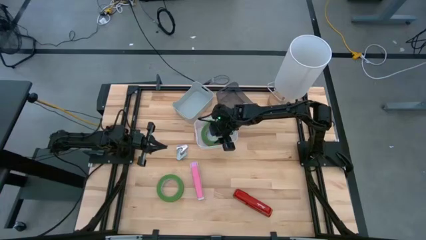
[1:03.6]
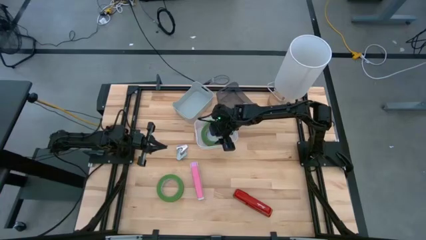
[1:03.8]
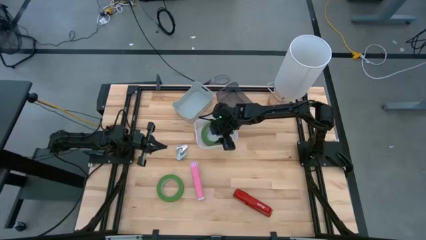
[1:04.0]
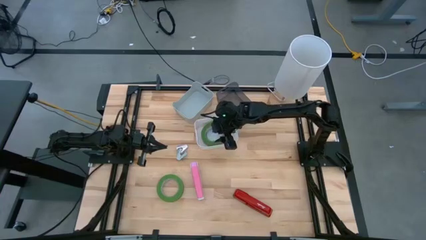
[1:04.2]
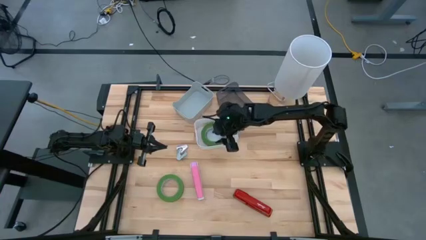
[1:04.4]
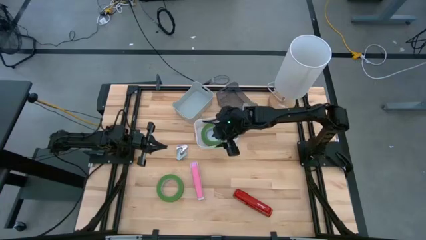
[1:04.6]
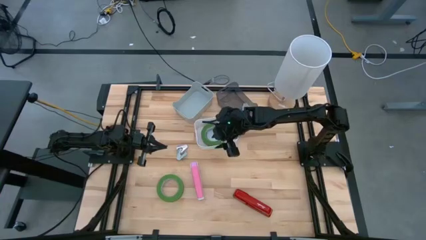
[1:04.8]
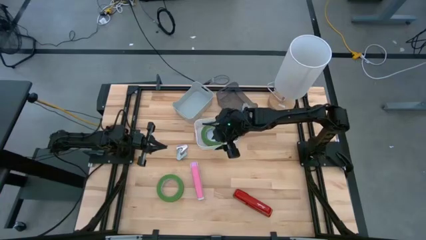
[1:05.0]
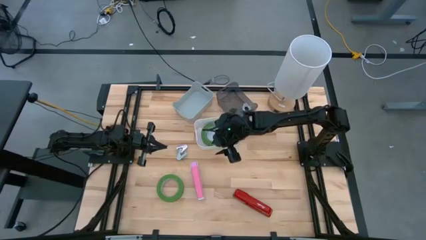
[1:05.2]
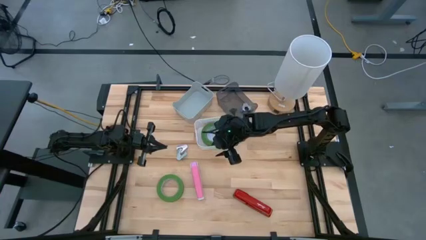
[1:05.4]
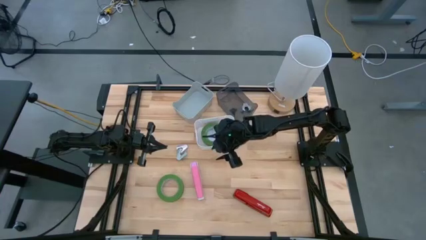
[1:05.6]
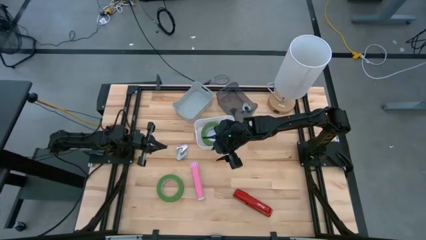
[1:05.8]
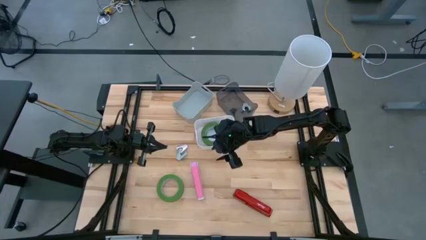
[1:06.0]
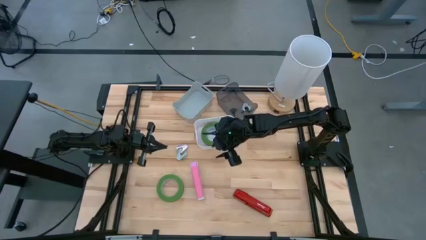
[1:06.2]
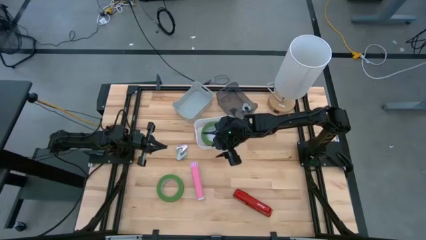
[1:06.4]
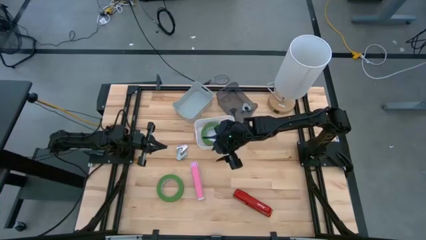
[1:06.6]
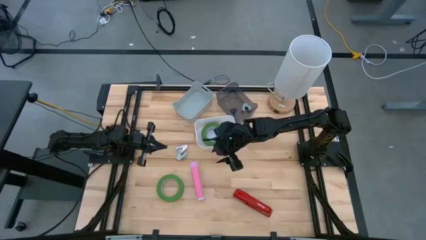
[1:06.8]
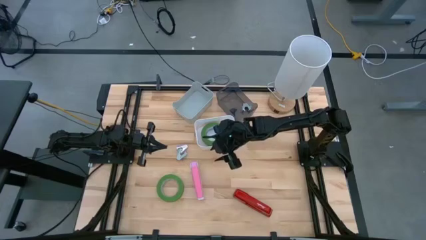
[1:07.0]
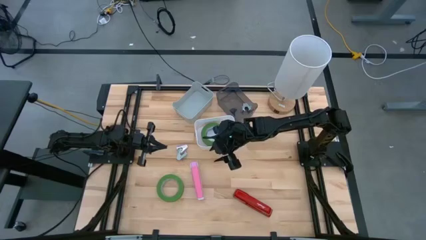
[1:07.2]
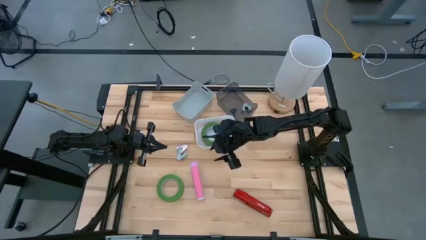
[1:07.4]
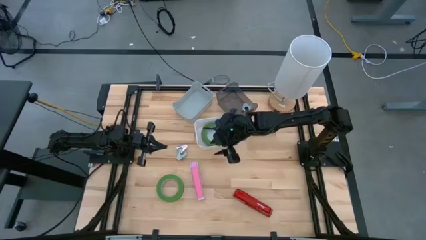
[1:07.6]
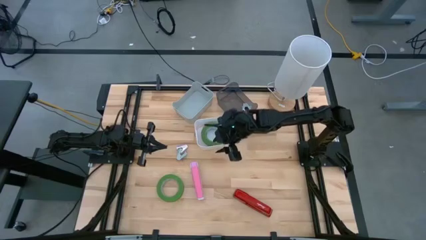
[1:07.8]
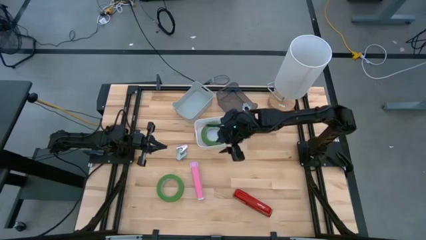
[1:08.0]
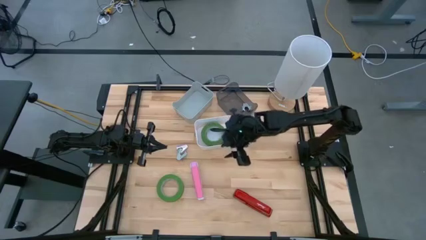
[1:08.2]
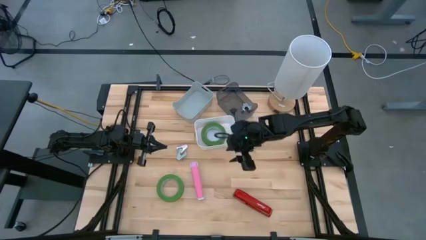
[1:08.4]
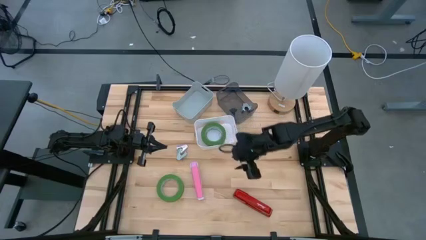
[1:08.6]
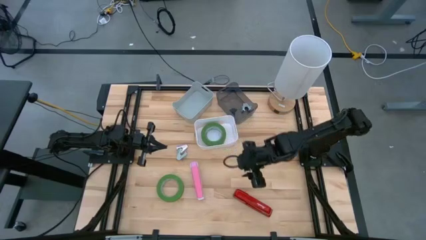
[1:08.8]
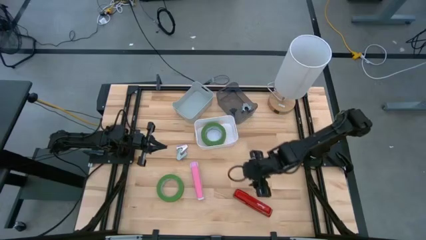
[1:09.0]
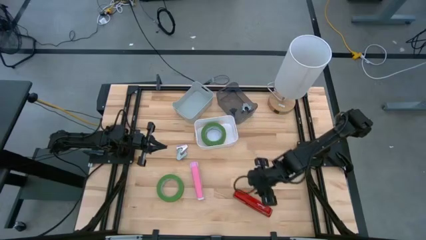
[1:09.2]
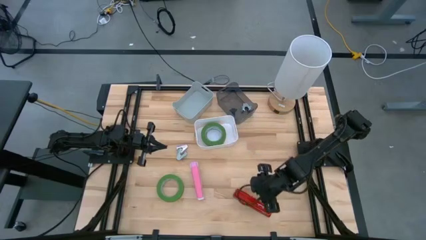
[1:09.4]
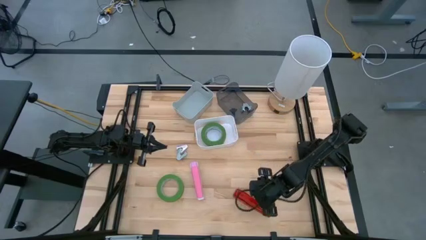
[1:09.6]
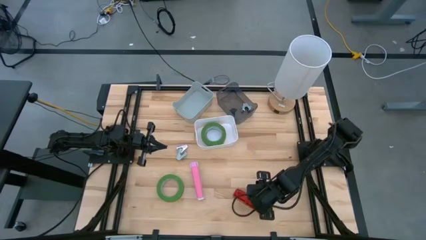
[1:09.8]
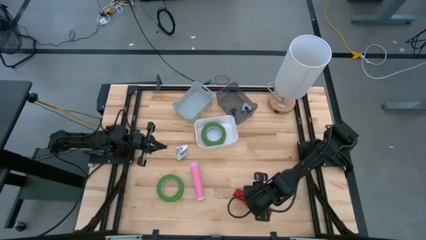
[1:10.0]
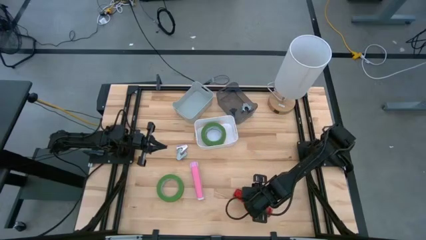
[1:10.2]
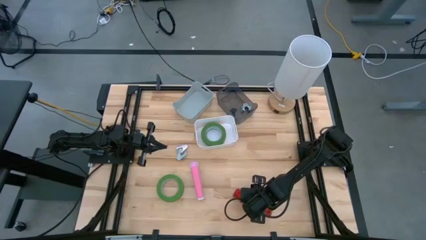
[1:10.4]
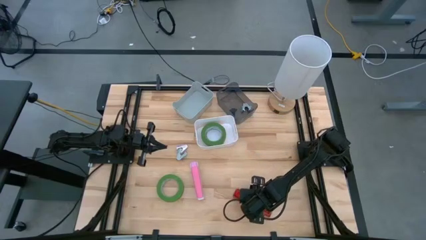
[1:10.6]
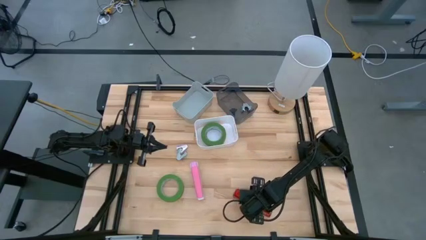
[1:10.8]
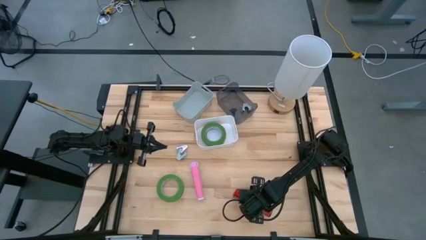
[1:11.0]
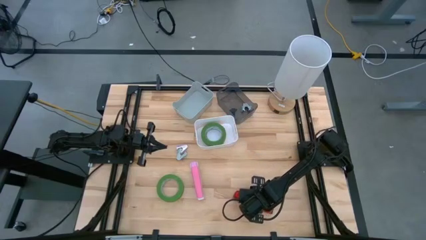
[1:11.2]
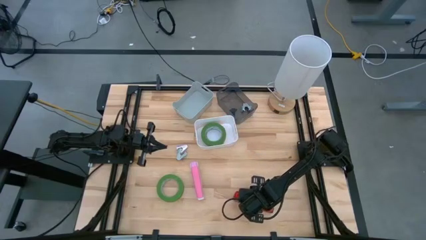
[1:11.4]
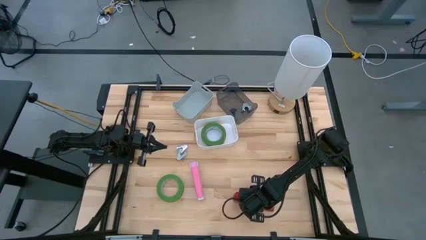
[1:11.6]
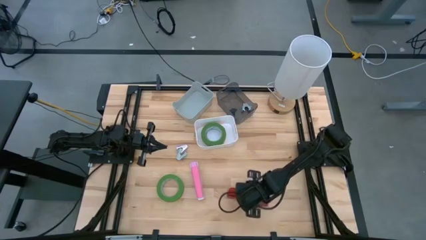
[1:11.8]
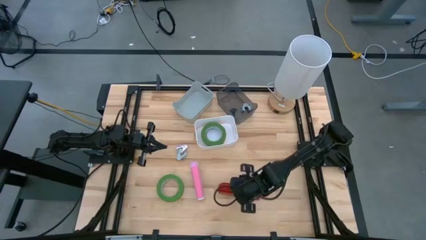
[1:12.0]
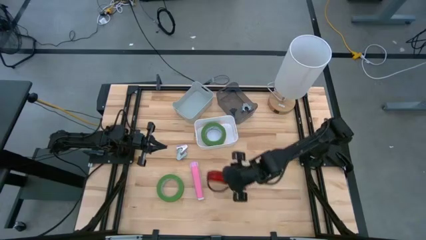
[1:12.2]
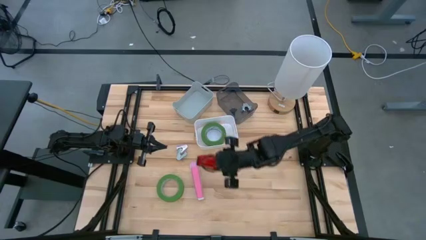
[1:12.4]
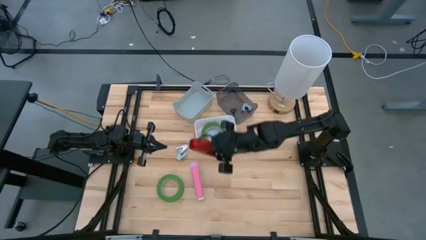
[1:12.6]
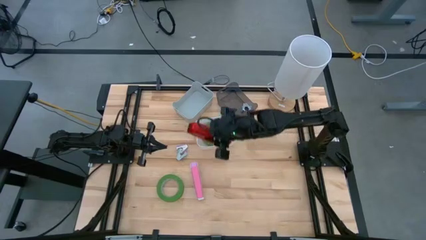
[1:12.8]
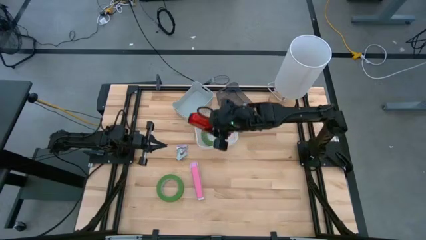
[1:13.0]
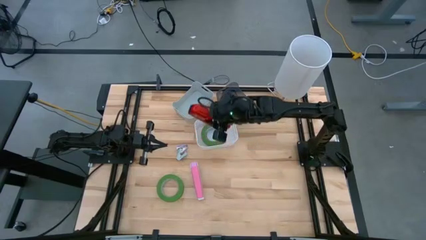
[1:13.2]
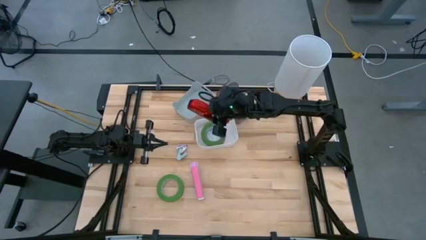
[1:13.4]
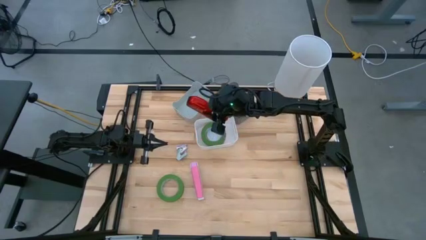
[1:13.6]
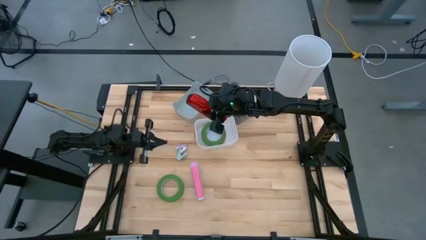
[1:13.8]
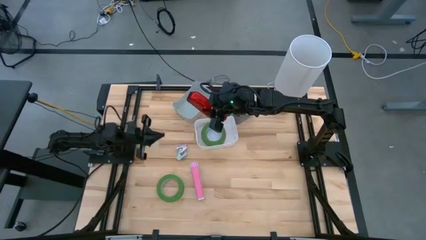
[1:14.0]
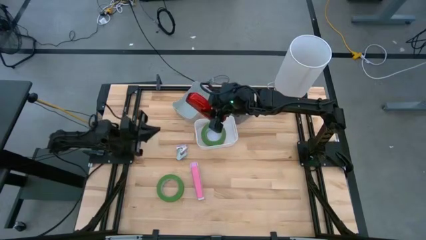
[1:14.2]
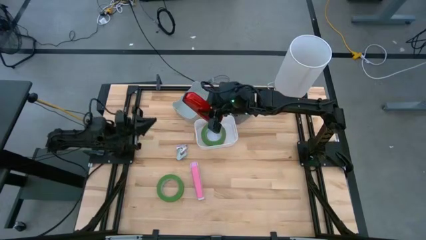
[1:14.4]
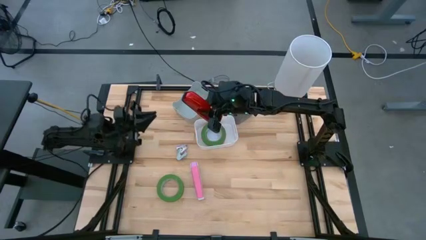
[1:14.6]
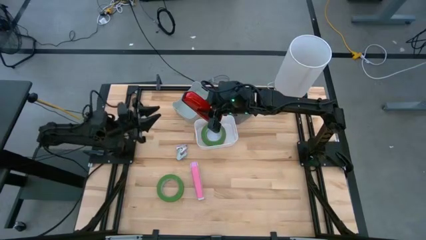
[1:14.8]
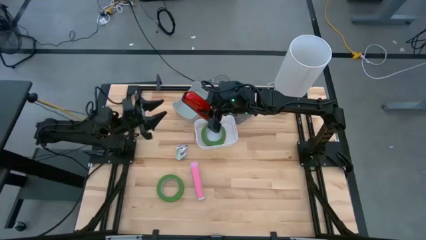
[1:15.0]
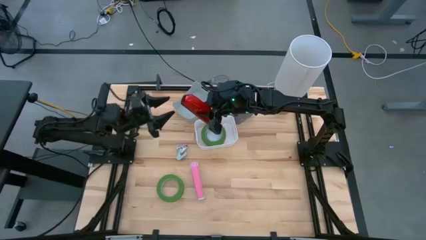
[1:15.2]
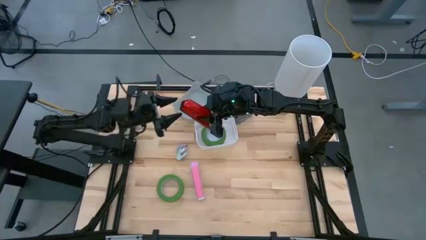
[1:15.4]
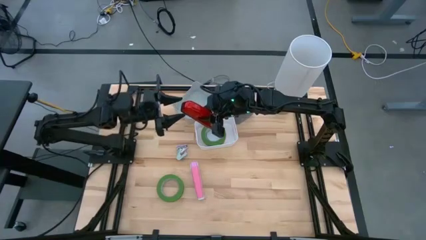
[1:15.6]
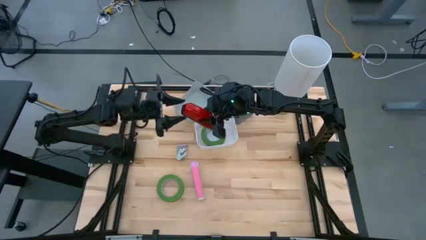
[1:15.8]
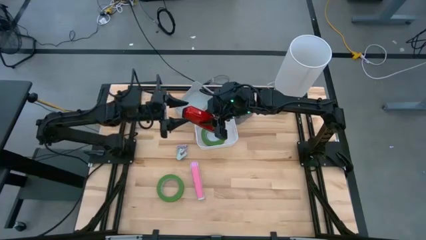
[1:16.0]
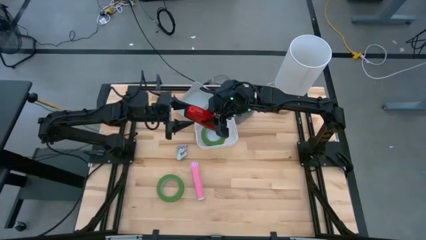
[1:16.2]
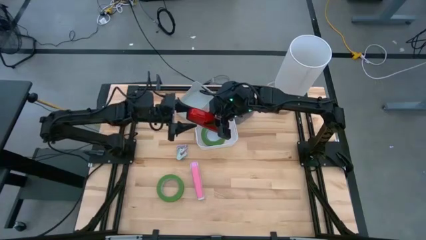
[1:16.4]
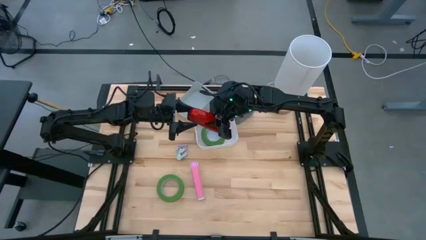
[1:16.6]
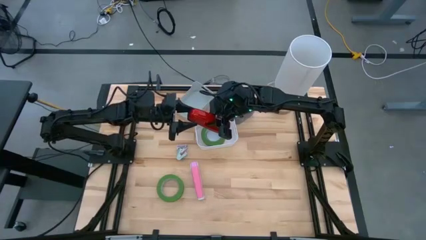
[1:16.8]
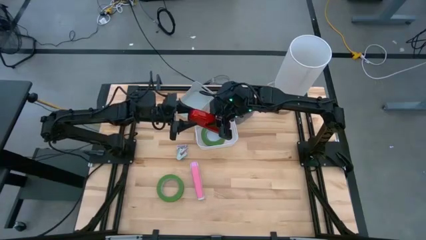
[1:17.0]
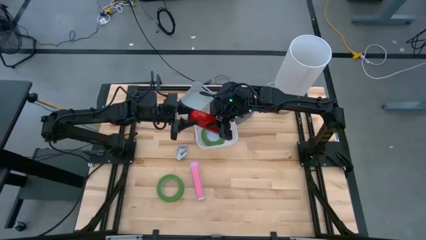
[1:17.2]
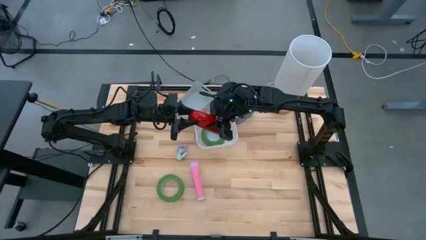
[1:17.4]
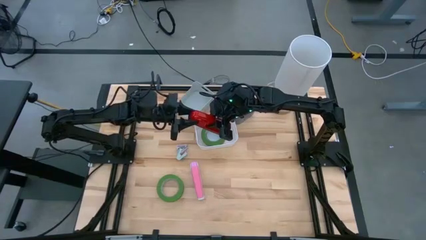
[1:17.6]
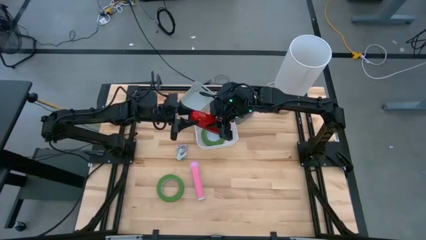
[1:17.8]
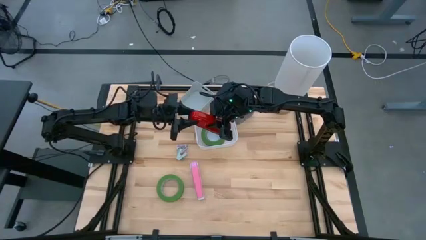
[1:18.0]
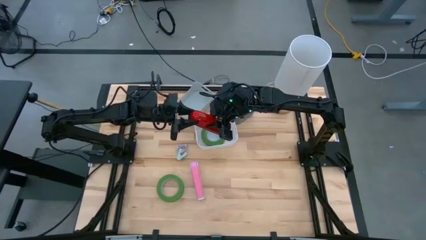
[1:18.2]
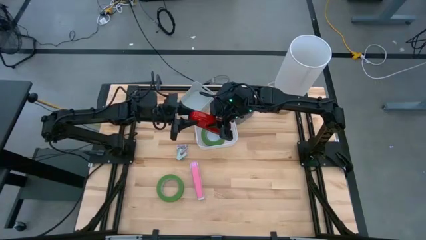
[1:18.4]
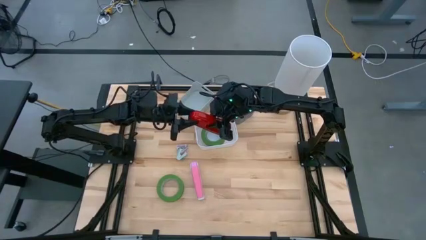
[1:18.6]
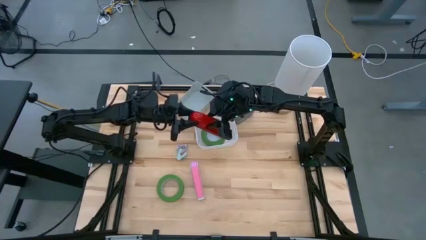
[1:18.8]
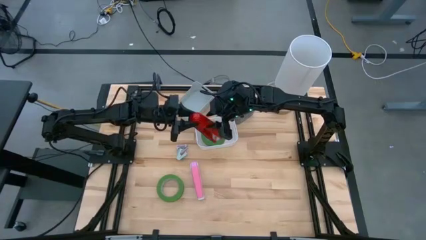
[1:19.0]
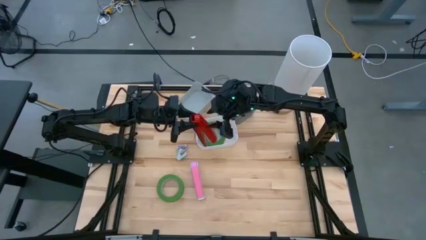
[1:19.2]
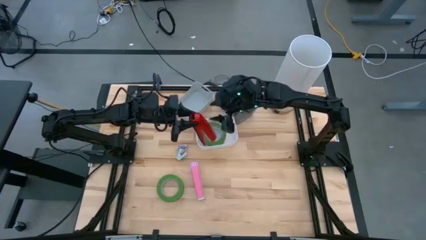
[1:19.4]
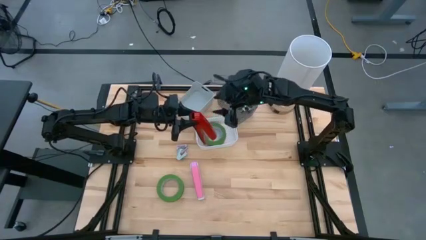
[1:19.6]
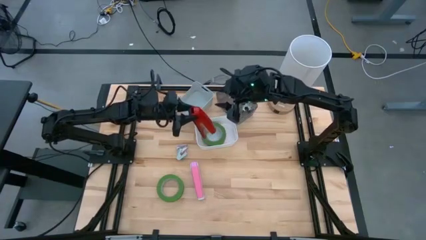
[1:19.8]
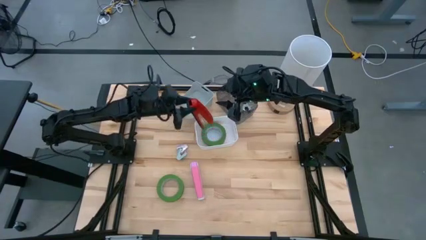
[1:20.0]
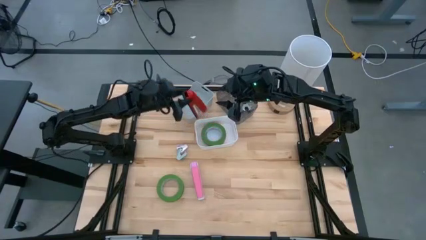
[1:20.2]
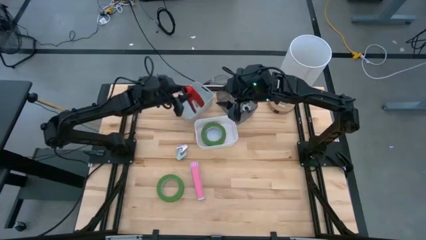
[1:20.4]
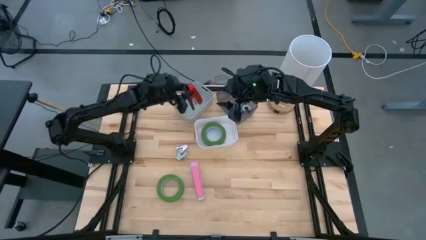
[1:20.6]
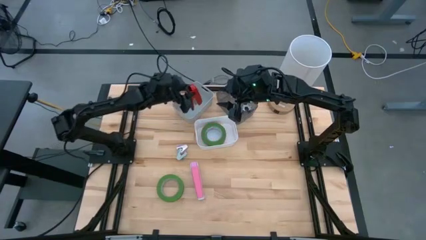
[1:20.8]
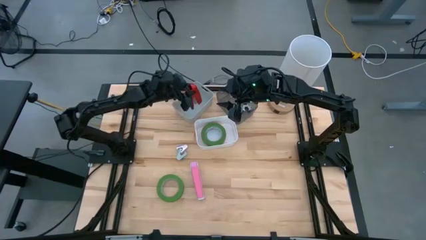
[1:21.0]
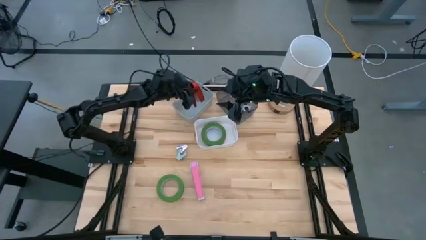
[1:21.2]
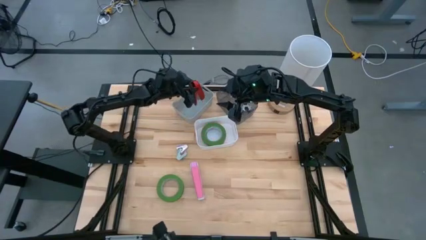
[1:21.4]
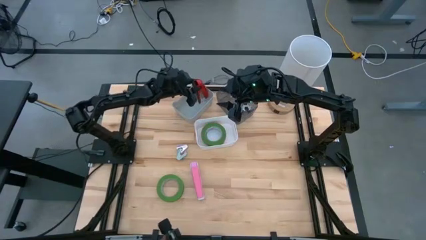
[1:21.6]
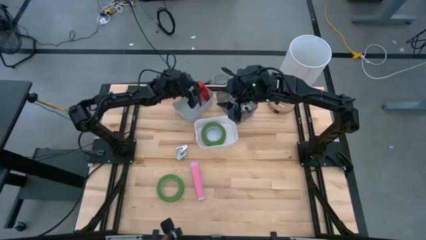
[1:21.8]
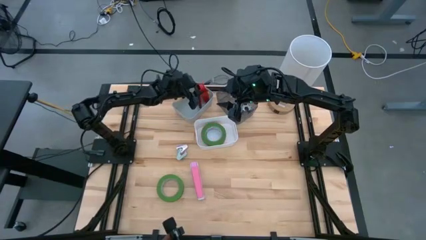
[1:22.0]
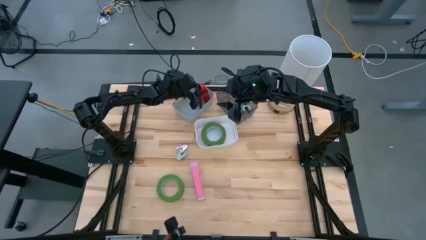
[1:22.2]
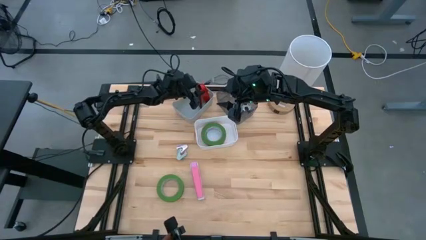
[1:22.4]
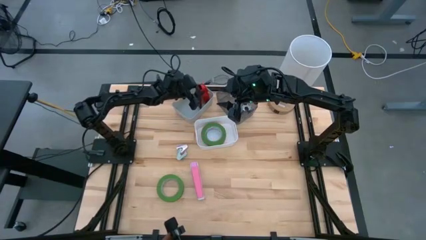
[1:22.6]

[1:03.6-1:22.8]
Task: Pick and place Stapler, Stapler remover, tape
Put the red stapler into the gray bin
